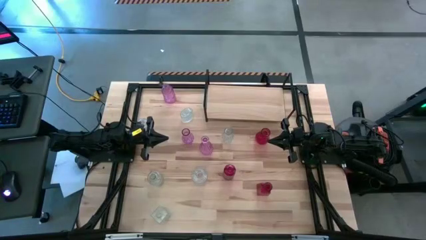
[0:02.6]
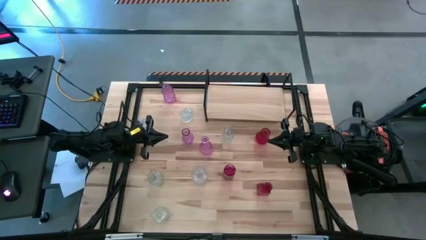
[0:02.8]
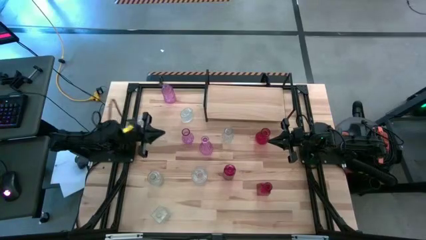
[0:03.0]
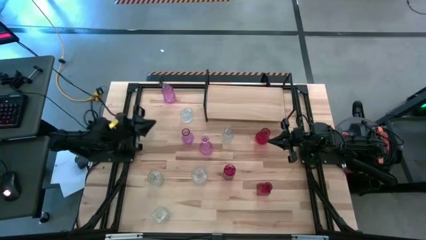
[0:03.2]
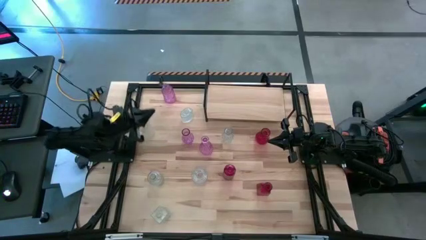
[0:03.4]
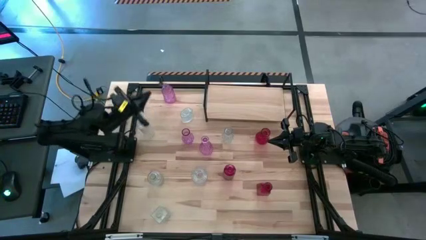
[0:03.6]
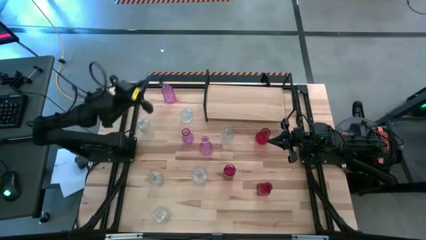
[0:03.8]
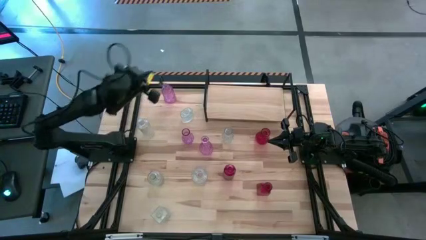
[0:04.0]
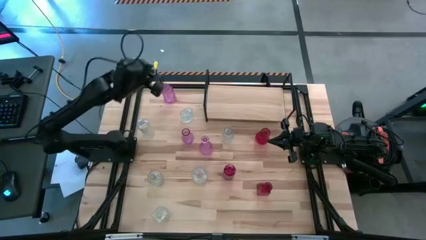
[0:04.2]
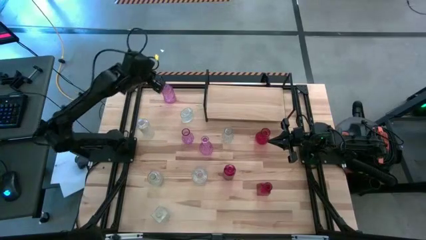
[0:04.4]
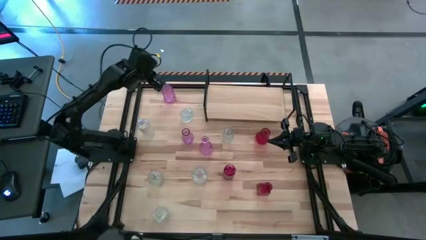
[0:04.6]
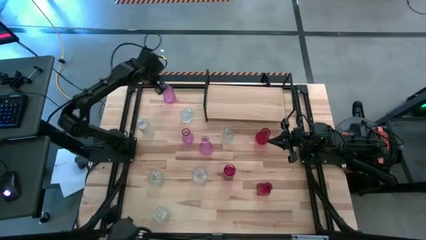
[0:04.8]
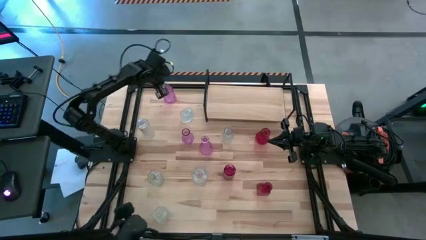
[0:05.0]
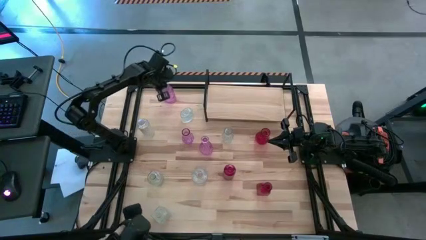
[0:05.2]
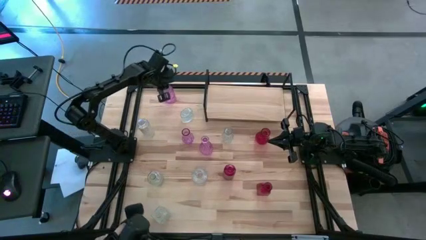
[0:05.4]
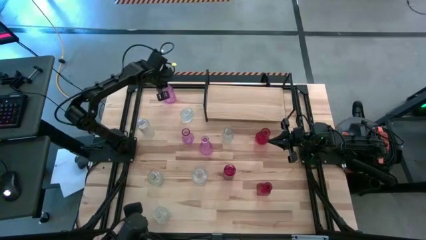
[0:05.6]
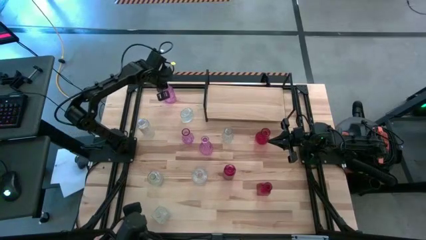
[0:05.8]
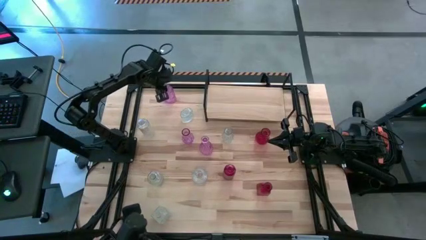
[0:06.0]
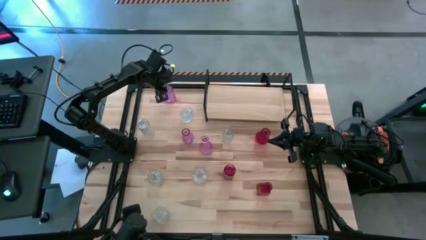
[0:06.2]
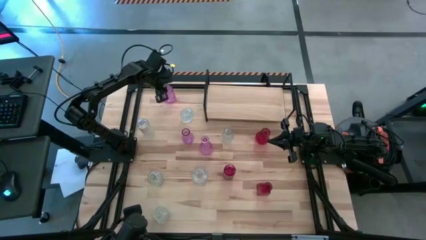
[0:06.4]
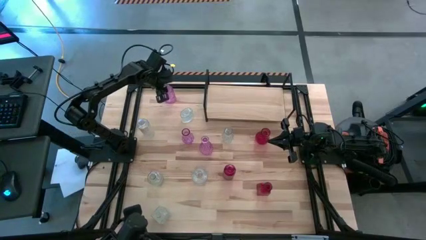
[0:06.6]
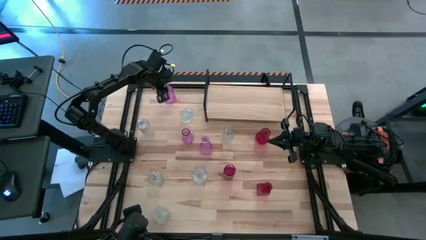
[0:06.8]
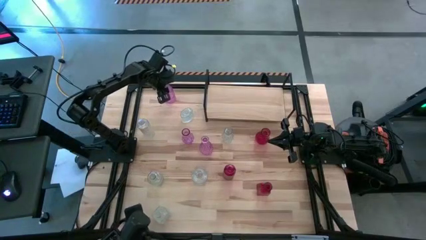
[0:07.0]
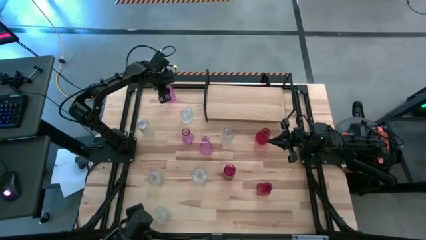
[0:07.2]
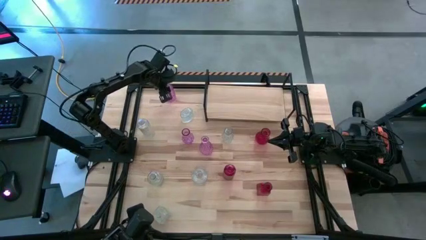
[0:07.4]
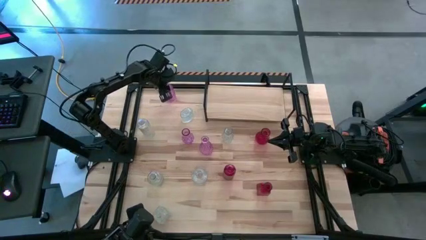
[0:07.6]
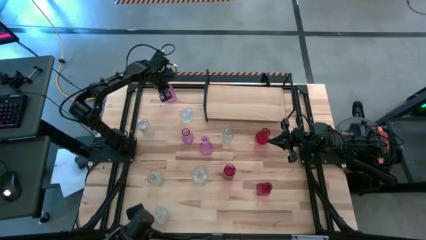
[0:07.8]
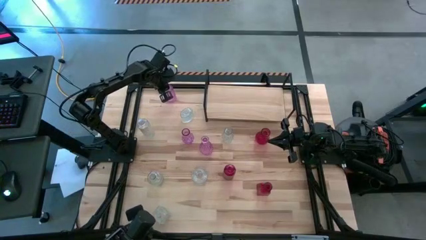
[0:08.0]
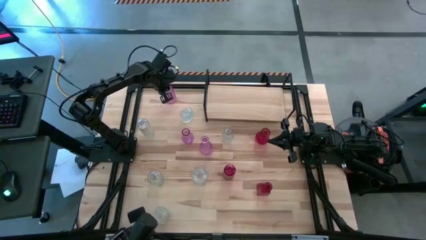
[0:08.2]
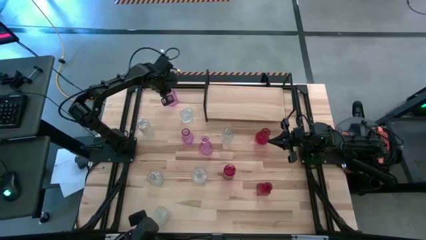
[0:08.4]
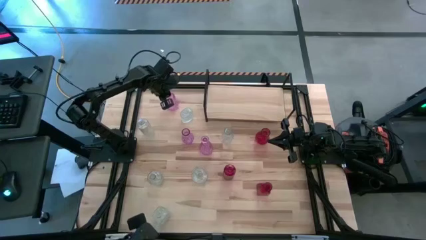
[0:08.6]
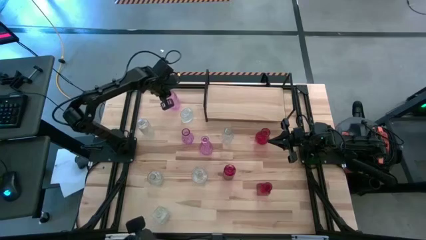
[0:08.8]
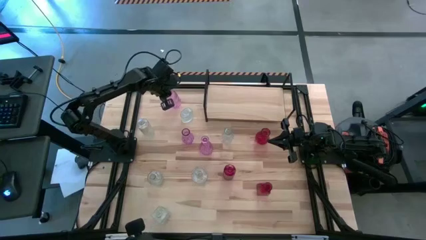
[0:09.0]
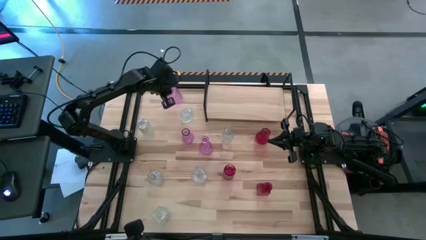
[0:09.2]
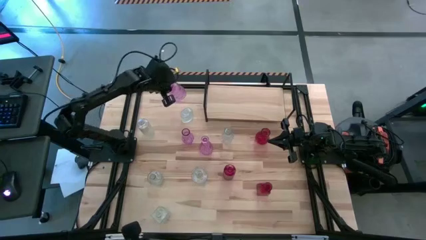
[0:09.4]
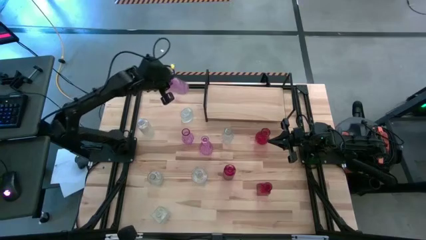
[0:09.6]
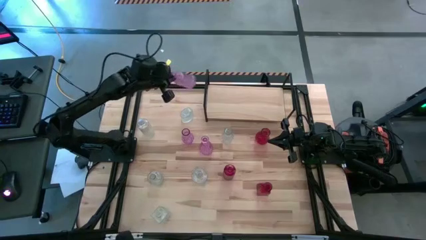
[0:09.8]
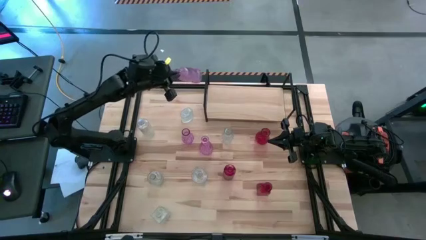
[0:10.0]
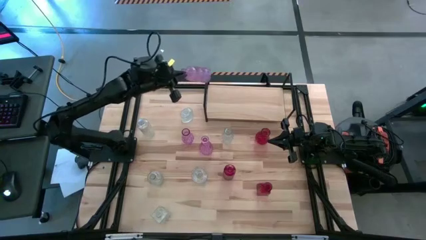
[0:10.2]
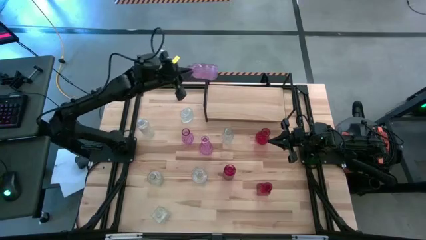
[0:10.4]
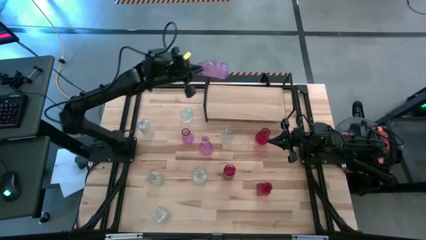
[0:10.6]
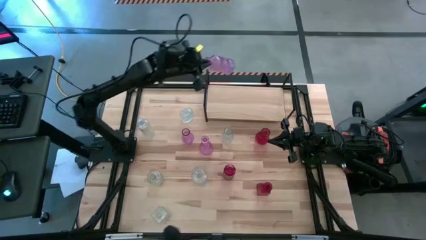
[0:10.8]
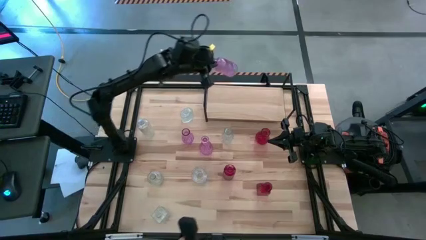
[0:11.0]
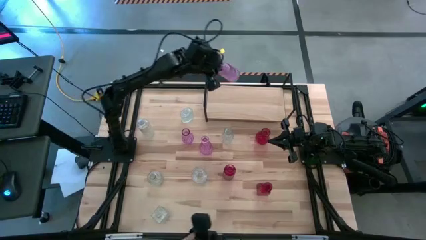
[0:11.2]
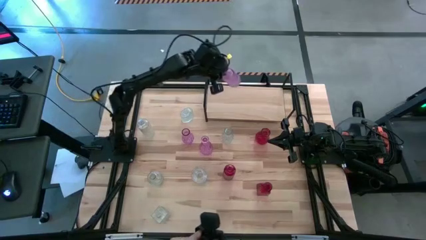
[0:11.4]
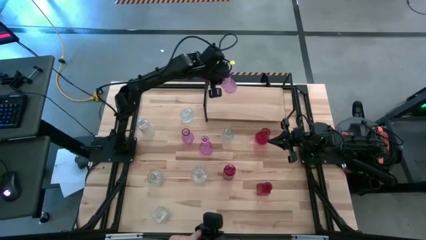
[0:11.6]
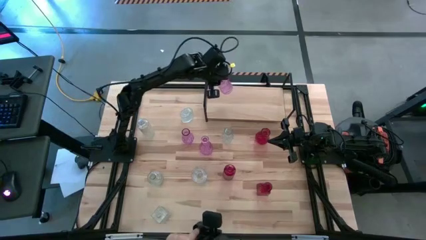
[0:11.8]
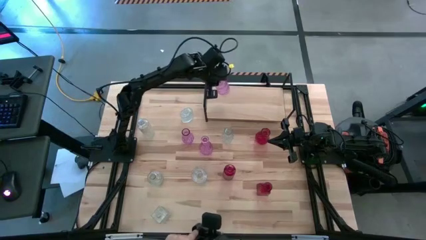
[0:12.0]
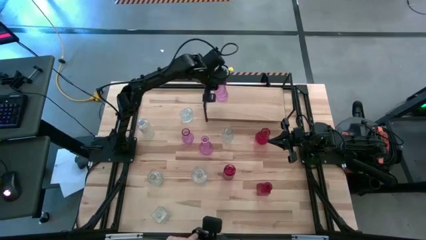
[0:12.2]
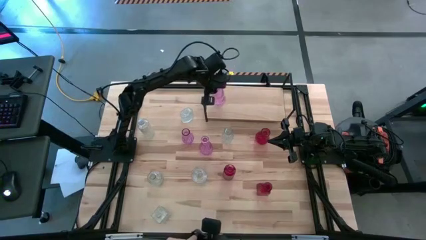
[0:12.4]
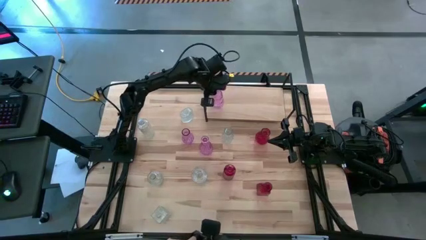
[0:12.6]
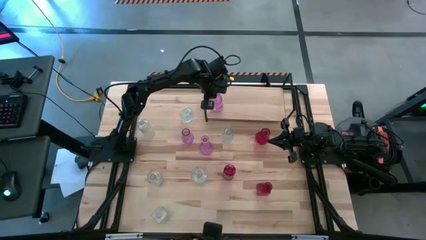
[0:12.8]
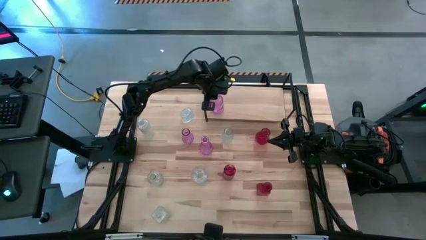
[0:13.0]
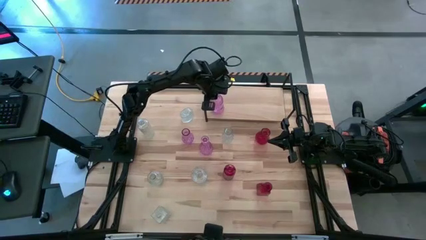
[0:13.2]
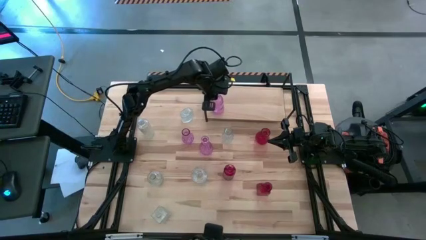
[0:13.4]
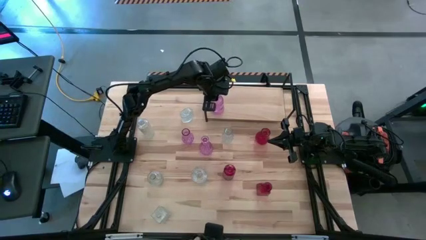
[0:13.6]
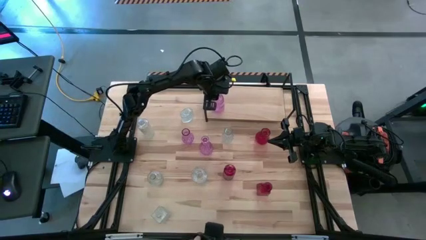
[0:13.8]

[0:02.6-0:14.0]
Task: sort vases onto shelf
Put the violet vase on the shelf
